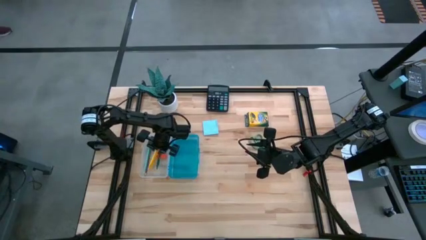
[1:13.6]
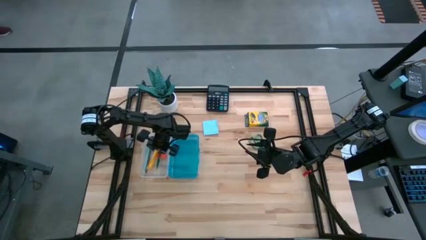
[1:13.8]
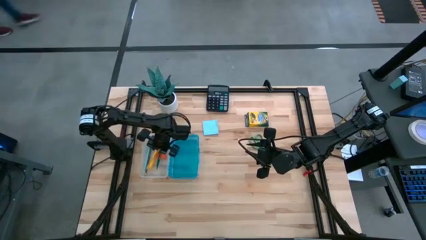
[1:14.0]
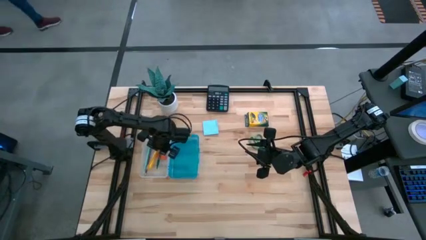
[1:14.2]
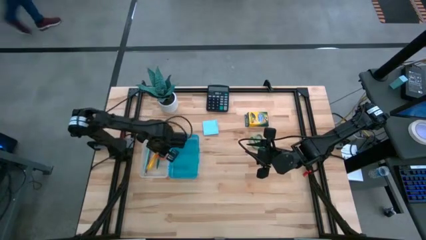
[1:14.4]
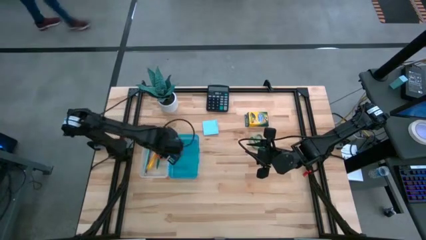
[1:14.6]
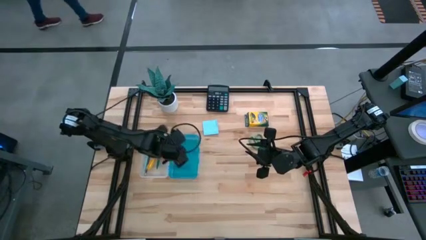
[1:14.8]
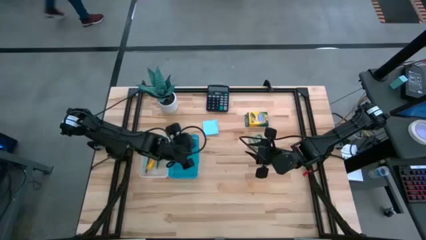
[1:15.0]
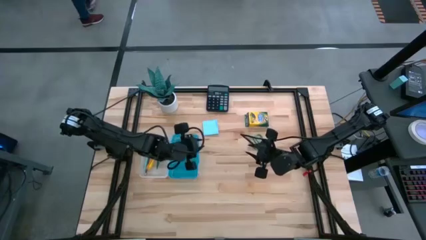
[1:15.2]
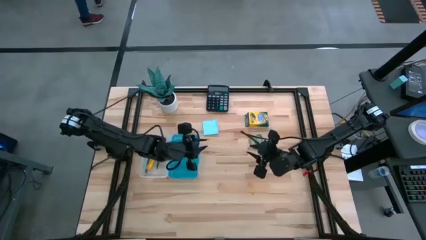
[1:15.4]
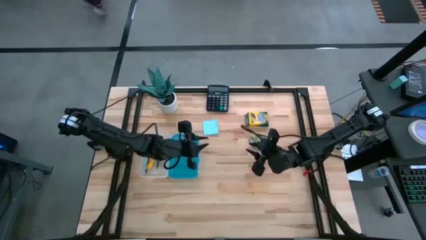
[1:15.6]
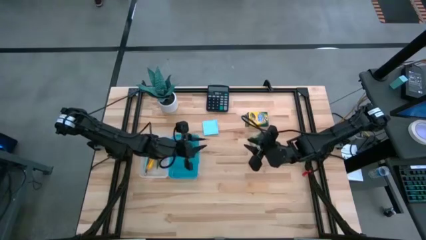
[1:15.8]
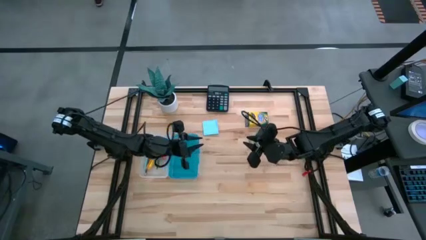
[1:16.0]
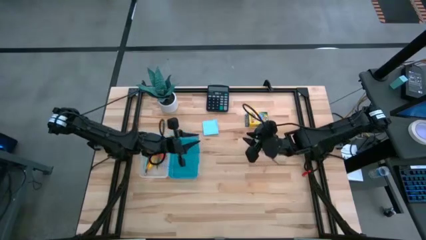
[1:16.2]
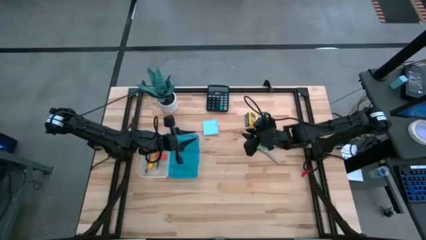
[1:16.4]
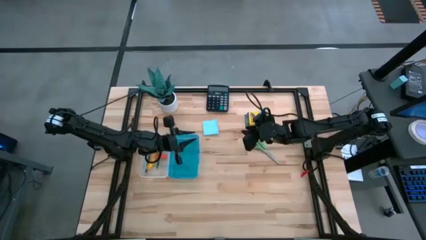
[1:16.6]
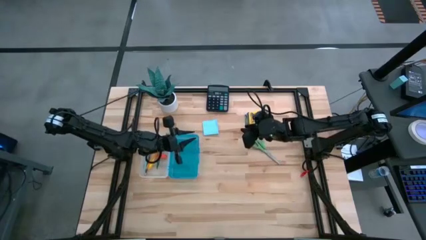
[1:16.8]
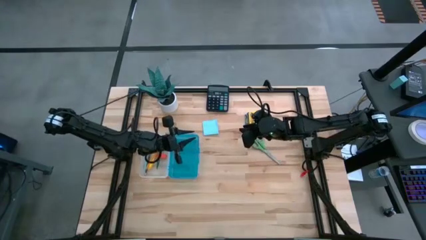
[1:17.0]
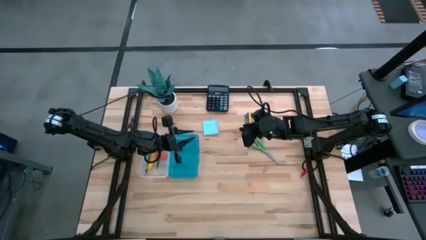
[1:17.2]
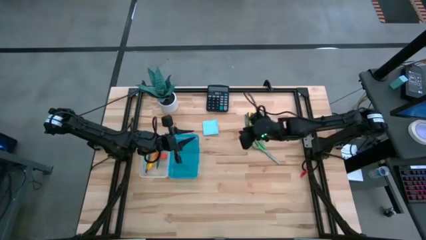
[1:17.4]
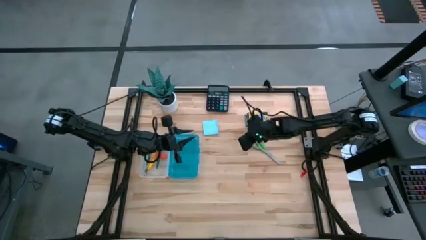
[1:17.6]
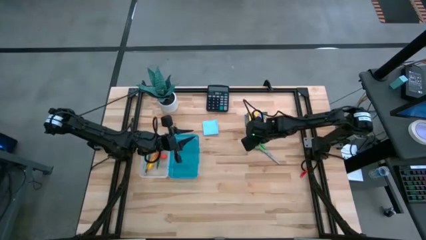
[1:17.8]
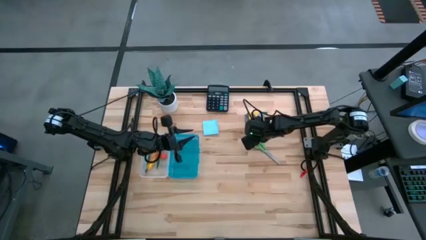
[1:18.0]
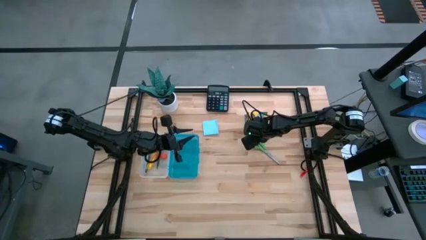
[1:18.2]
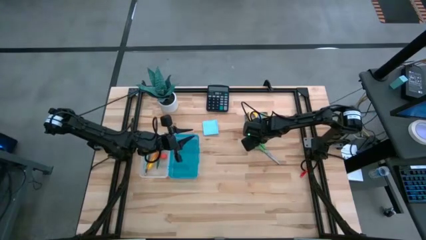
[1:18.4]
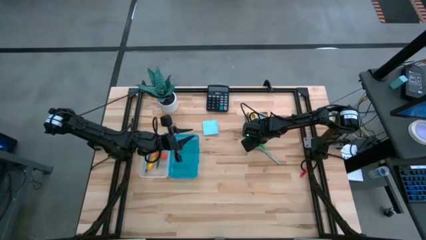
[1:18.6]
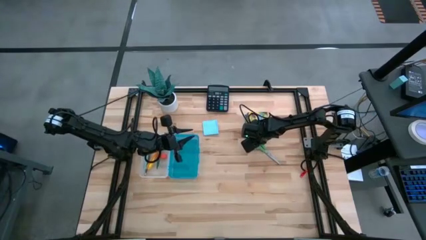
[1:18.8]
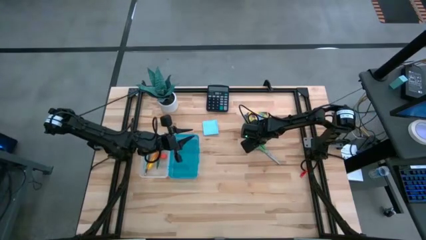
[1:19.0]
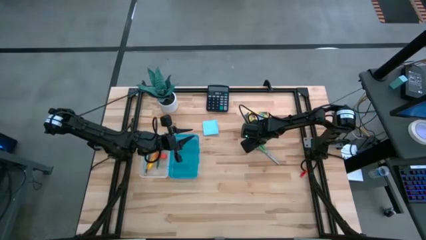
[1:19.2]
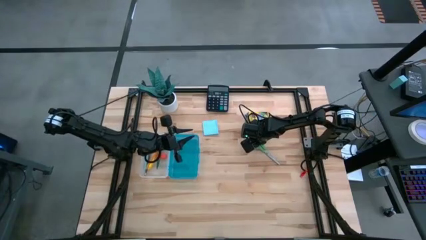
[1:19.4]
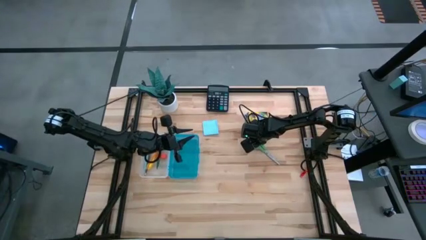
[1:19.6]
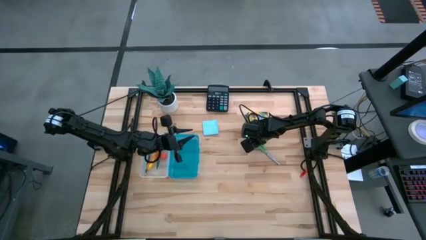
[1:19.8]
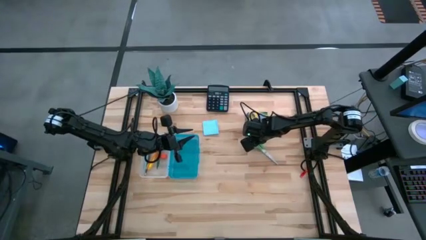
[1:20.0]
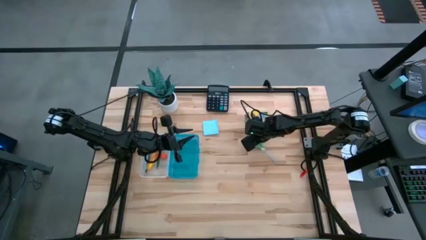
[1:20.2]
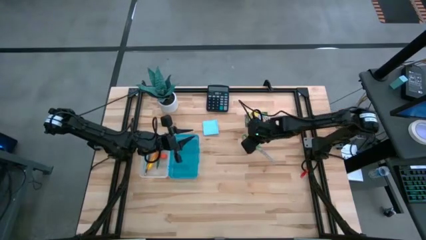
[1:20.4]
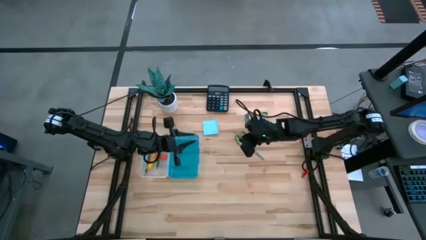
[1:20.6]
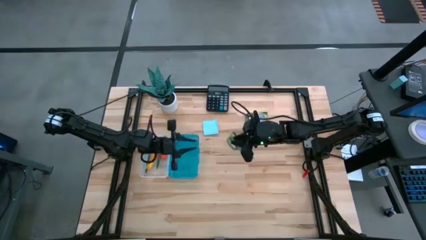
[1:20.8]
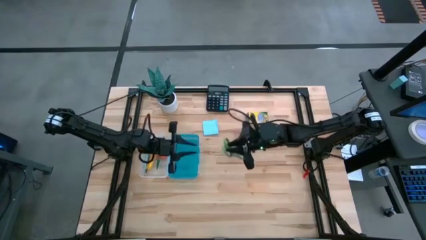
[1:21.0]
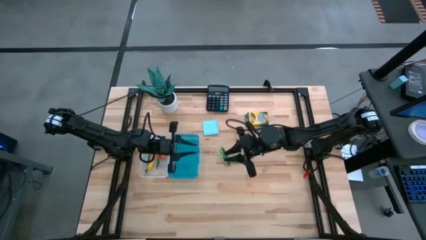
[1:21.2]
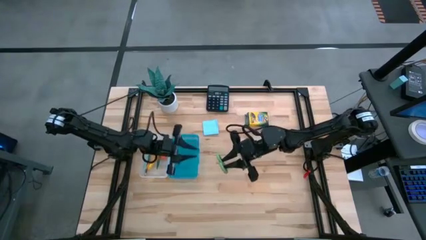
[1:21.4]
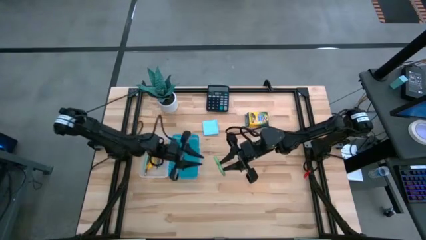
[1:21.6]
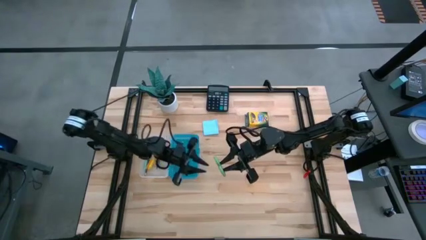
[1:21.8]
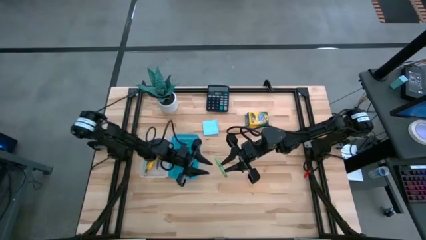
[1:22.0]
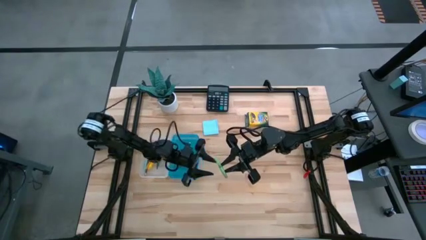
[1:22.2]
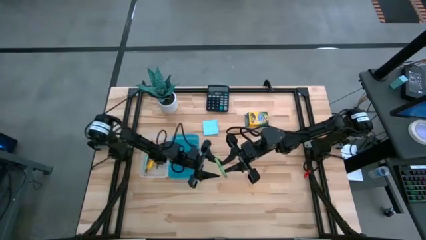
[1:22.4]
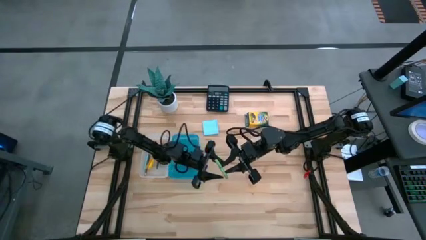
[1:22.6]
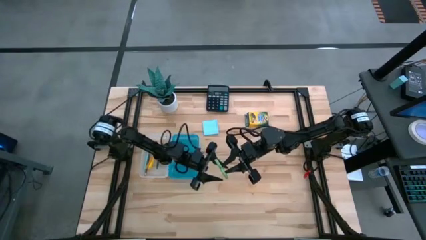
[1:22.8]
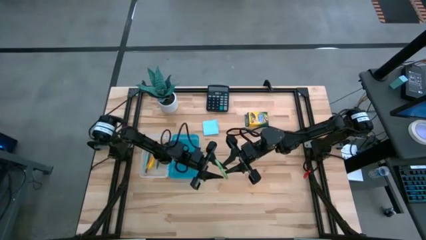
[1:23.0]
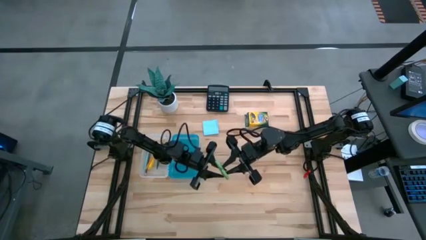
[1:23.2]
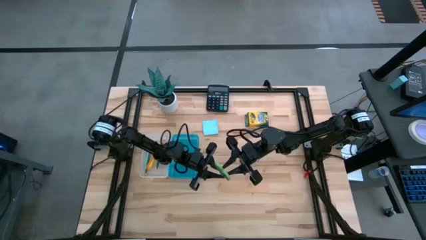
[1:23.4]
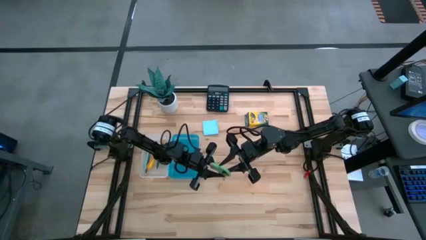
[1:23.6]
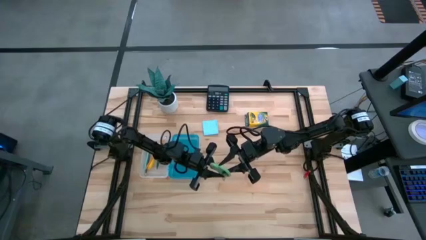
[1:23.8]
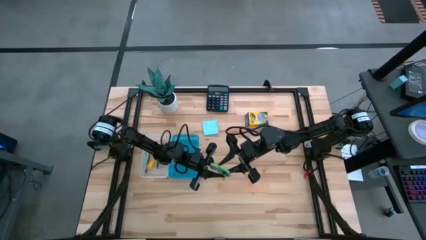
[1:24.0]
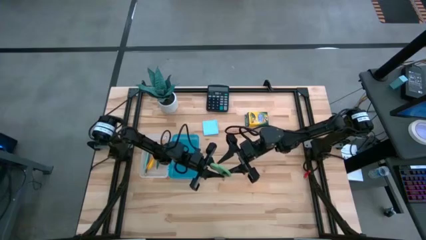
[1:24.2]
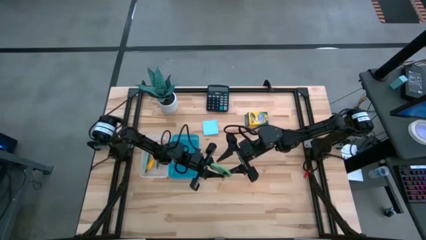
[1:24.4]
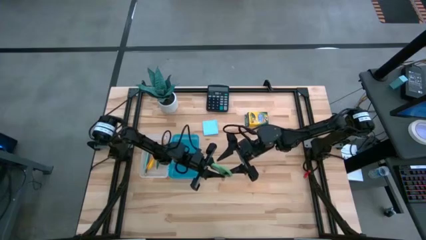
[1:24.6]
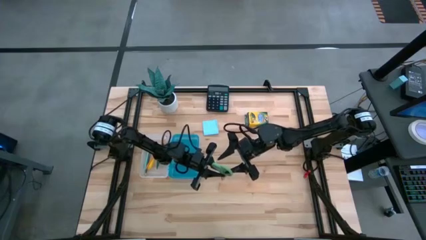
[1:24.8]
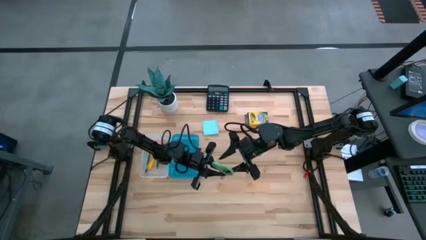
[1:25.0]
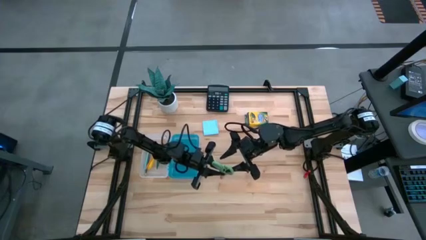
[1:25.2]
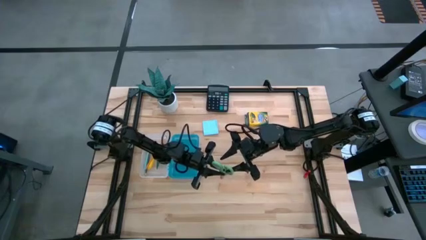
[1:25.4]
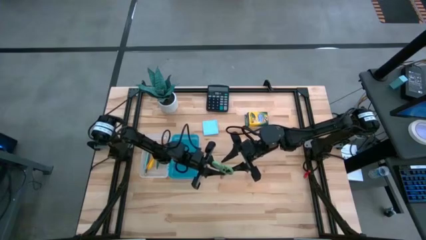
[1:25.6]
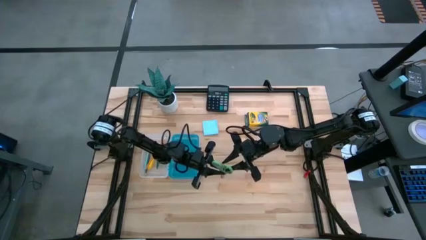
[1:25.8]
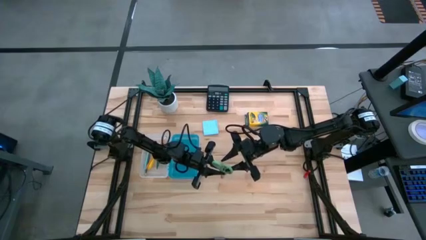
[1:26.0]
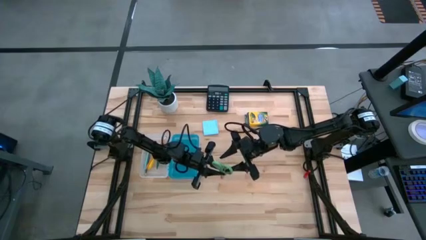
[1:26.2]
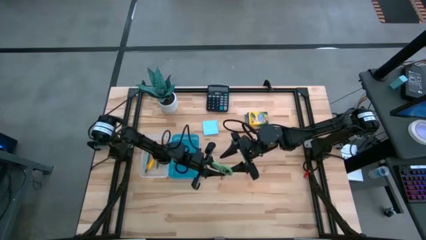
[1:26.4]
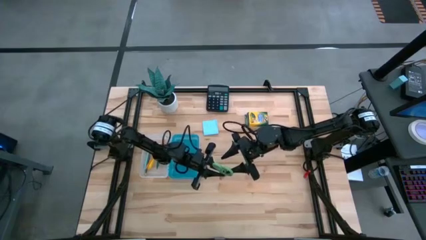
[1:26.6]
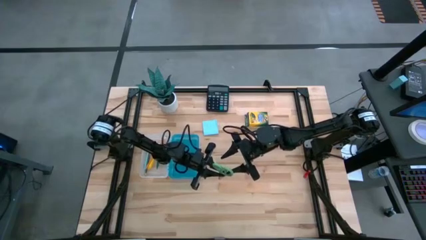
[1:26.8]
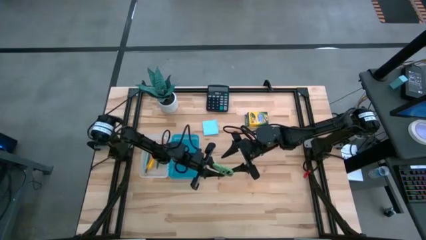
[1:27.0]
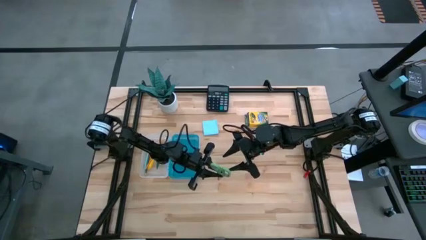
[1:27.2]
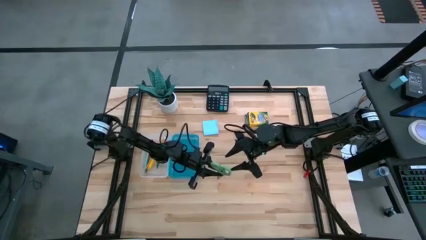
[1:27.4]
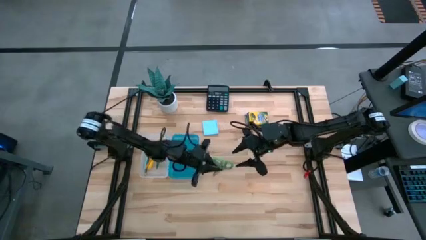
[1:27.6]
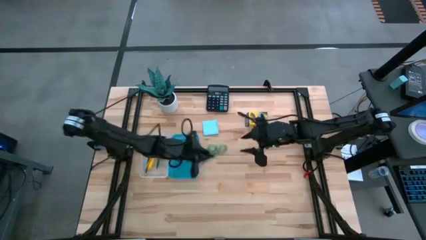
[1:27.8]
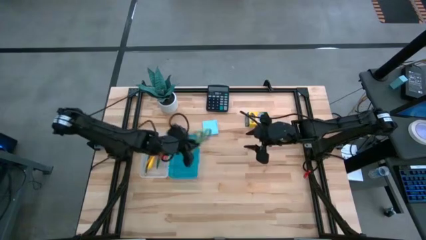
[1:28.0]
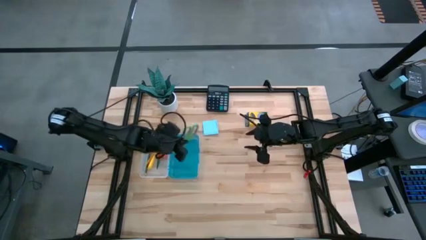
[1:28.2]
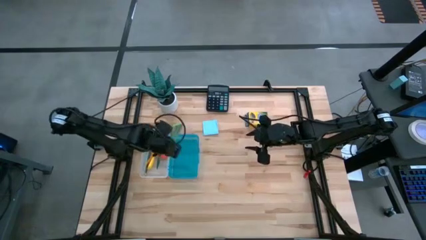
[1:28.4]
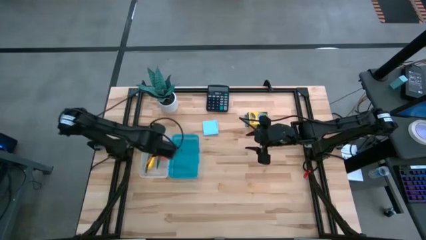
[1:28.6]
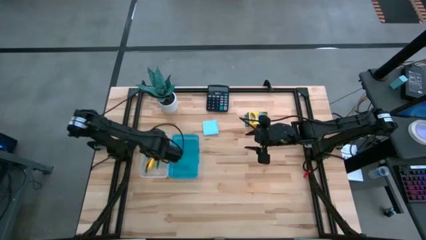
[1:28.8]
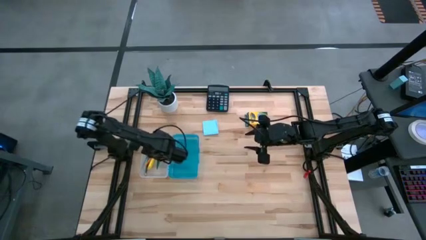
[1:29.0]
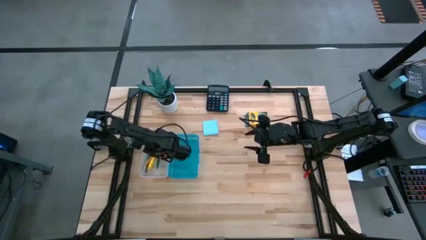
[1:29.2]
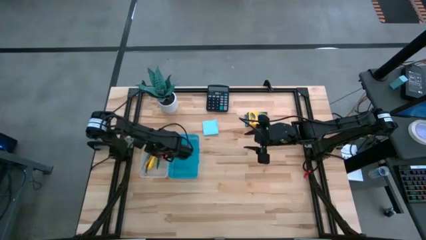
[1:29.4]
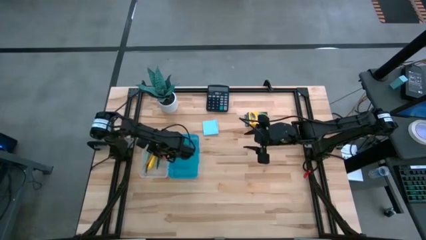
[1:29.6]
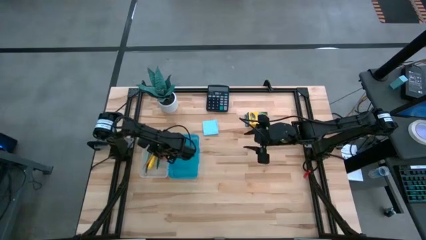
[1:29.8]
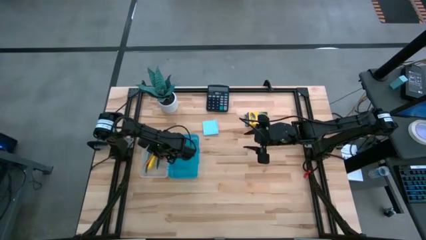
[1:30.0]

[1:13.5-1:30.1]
Task: Pack school essentials
Put the green scissors into the blue supply box
